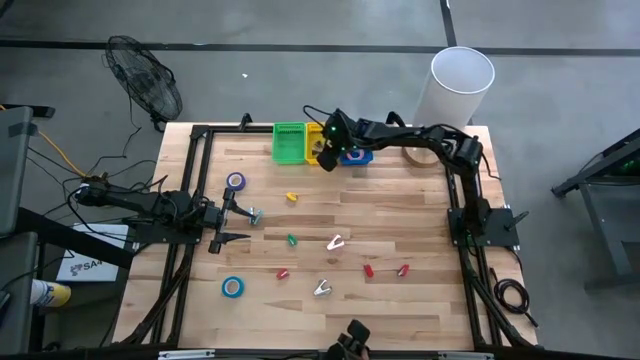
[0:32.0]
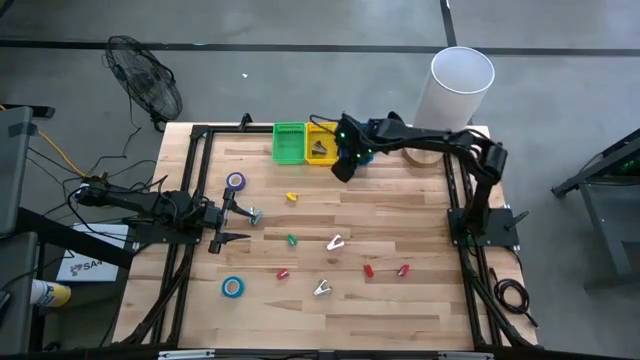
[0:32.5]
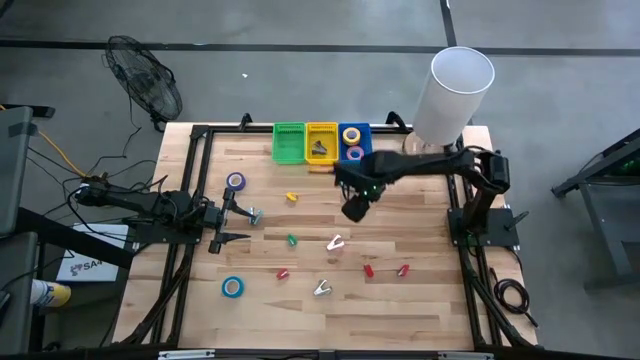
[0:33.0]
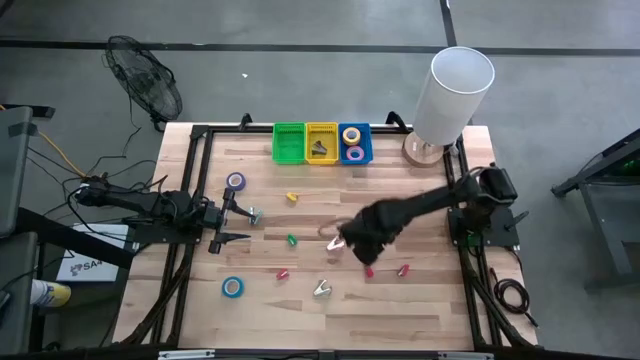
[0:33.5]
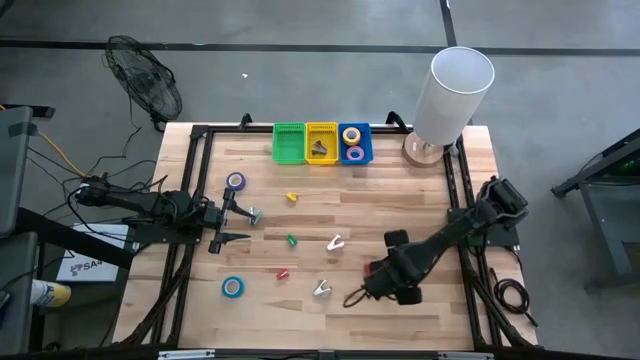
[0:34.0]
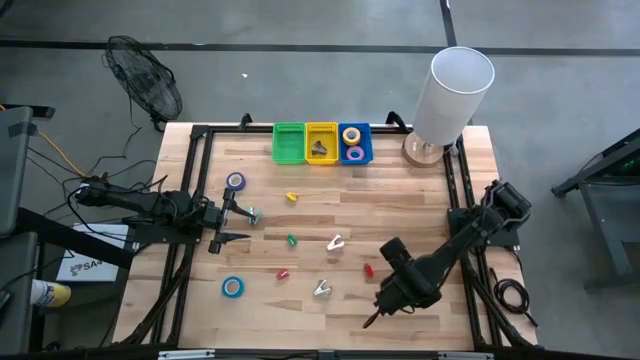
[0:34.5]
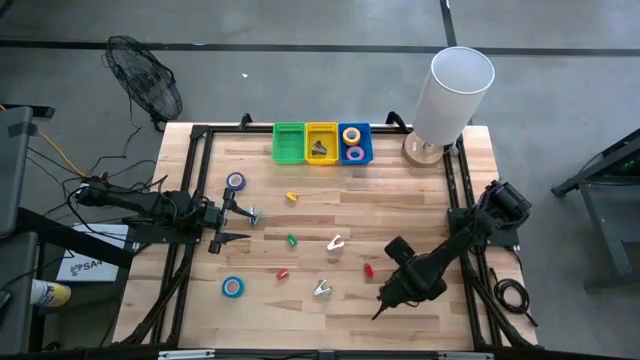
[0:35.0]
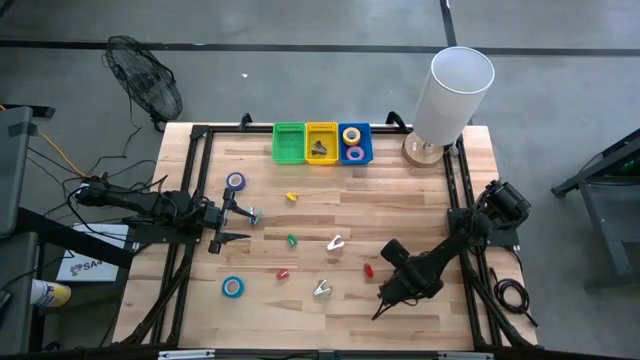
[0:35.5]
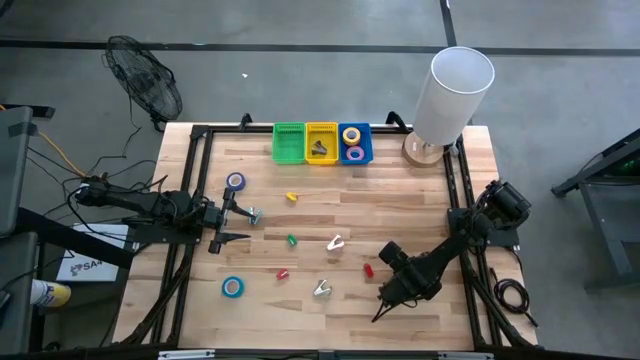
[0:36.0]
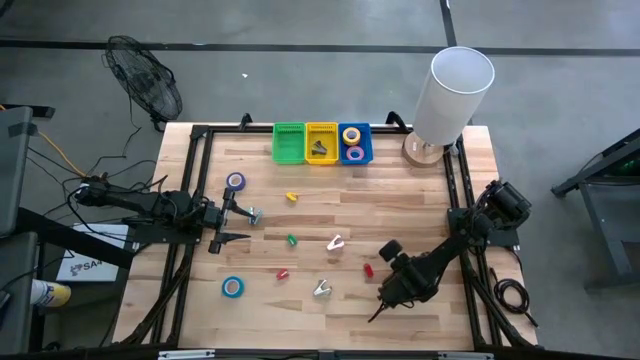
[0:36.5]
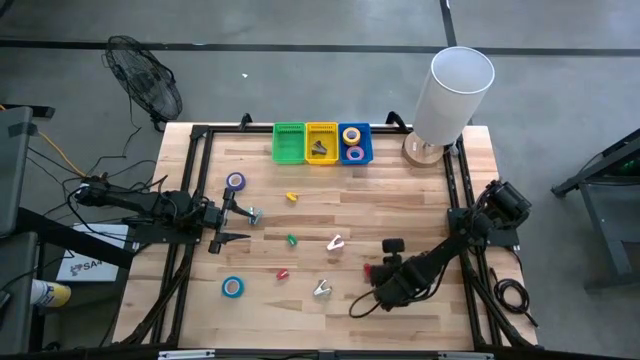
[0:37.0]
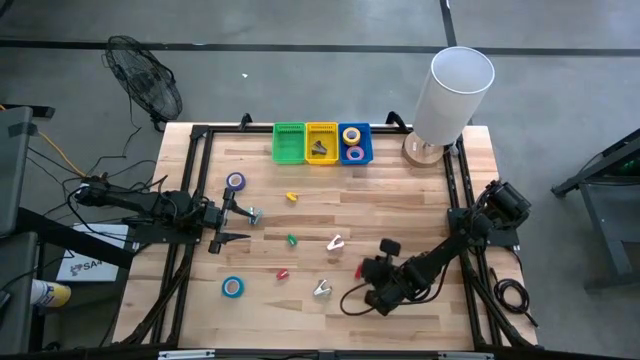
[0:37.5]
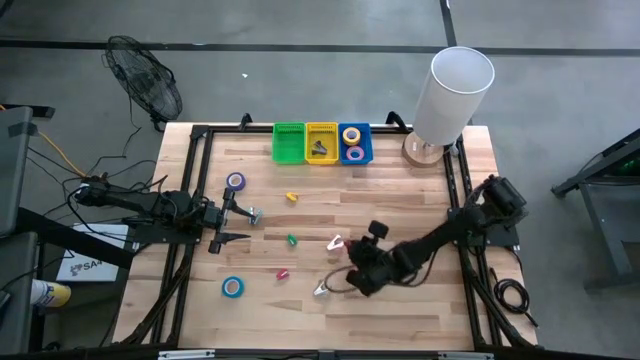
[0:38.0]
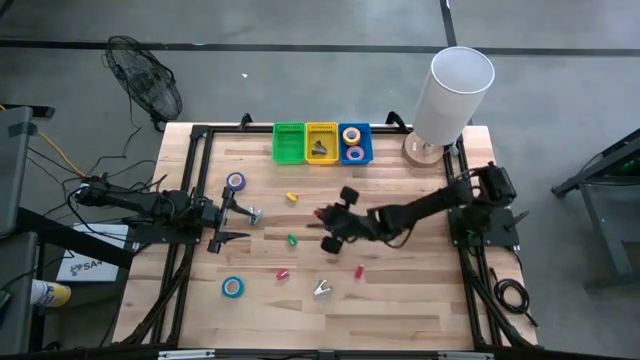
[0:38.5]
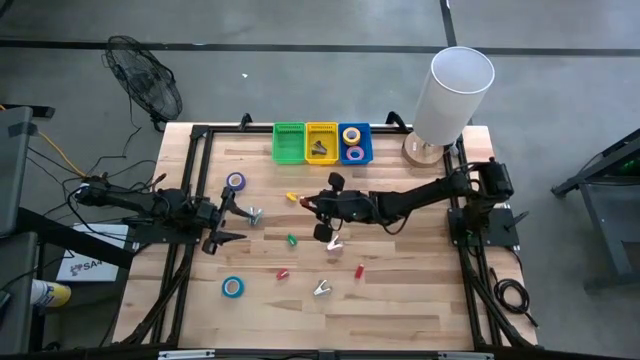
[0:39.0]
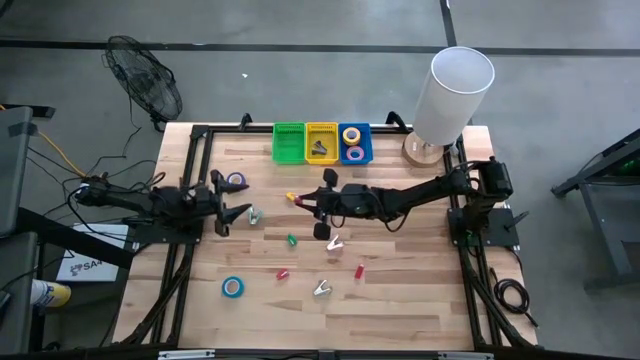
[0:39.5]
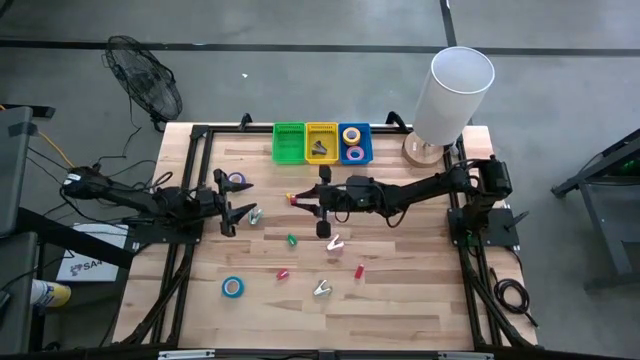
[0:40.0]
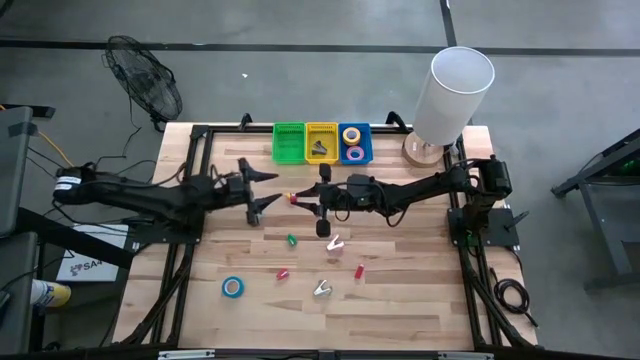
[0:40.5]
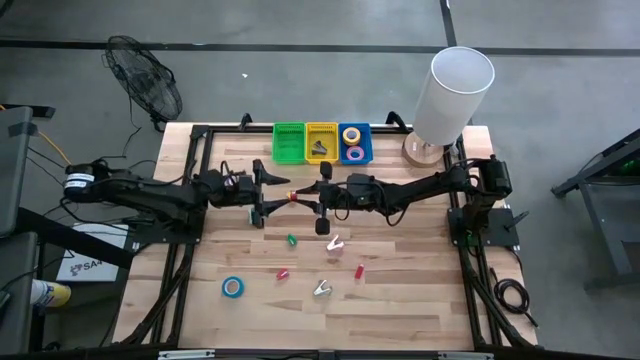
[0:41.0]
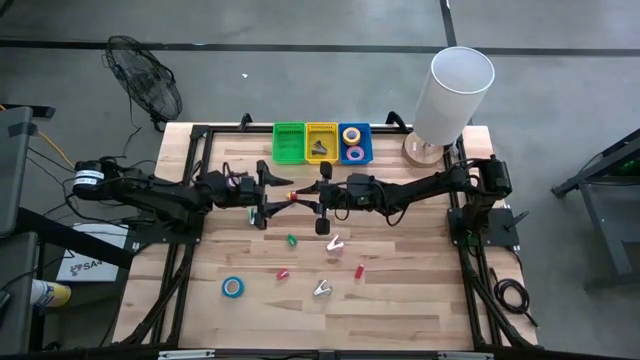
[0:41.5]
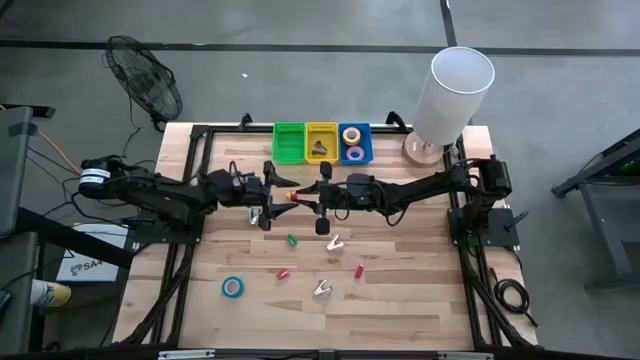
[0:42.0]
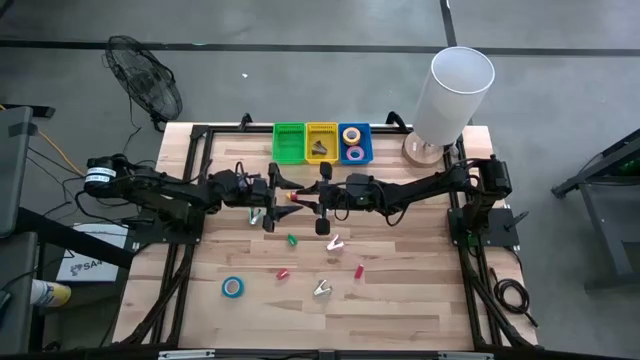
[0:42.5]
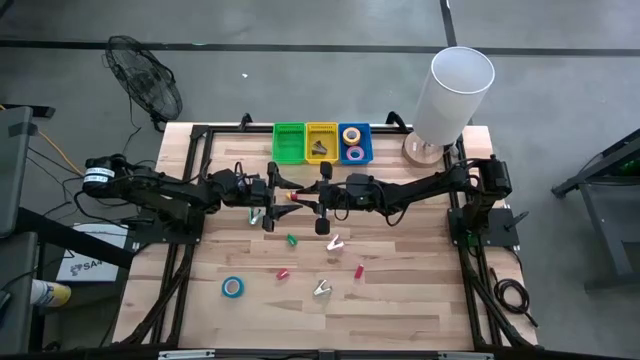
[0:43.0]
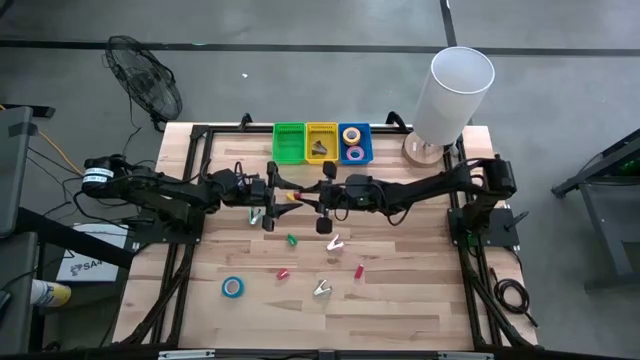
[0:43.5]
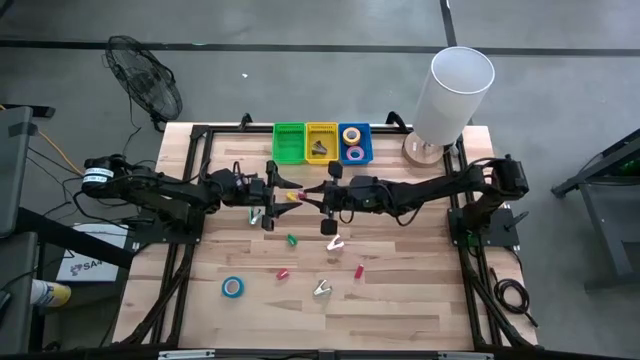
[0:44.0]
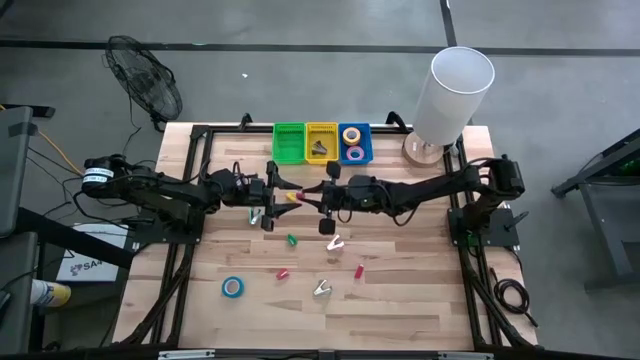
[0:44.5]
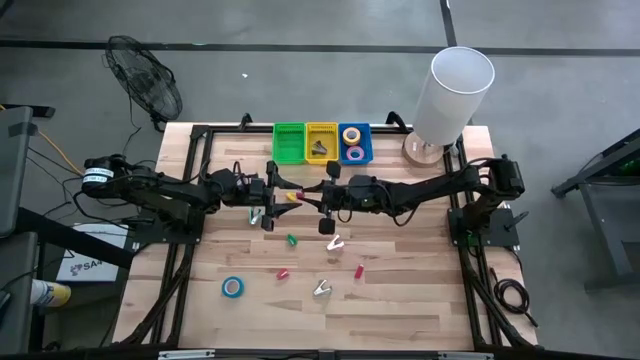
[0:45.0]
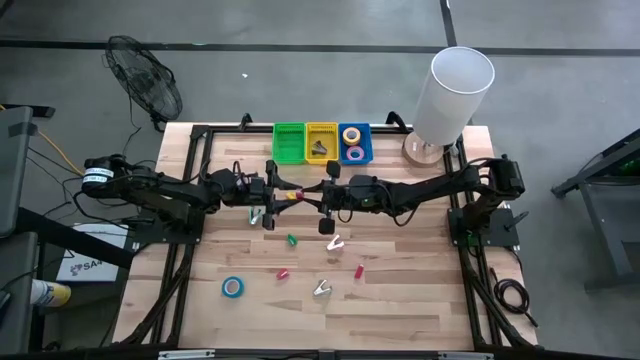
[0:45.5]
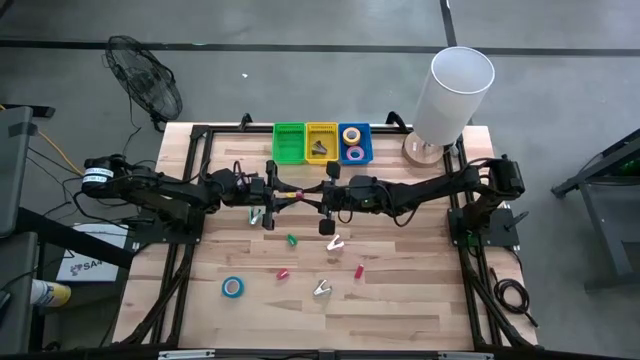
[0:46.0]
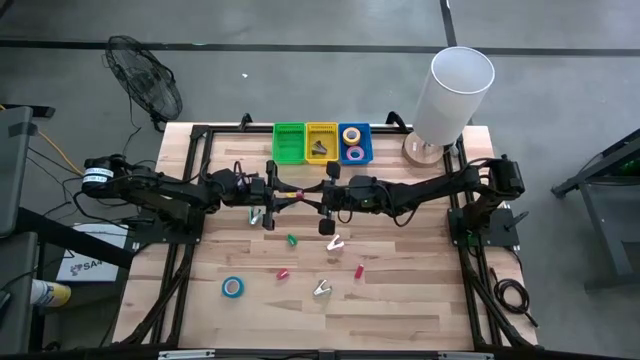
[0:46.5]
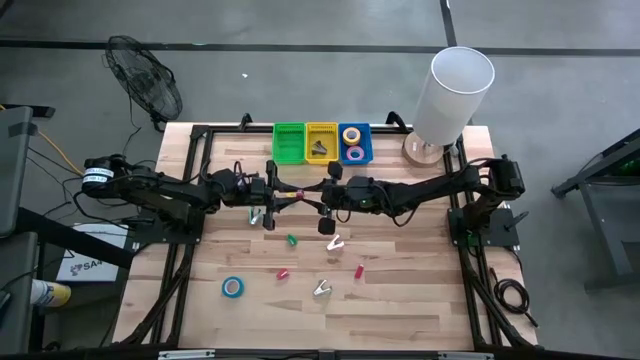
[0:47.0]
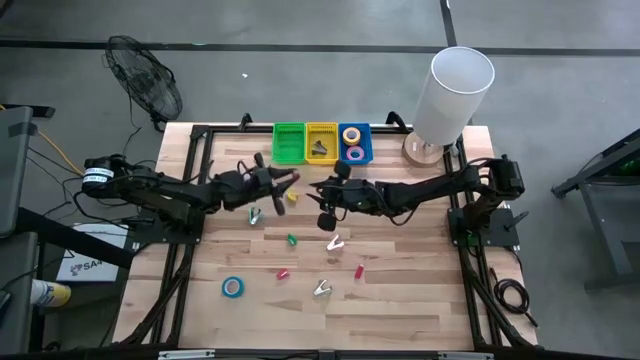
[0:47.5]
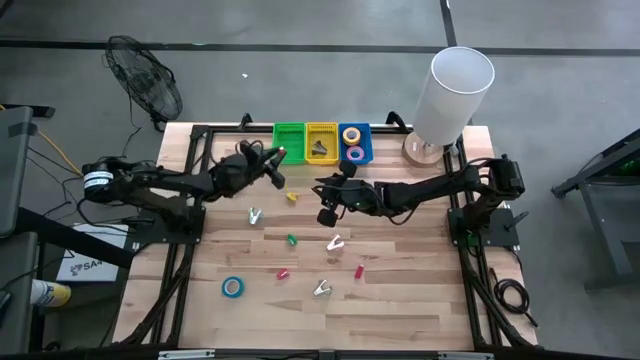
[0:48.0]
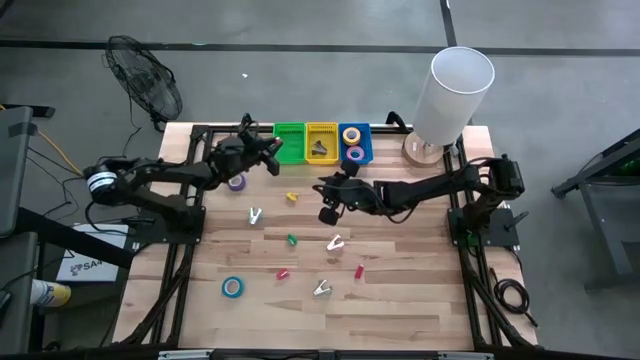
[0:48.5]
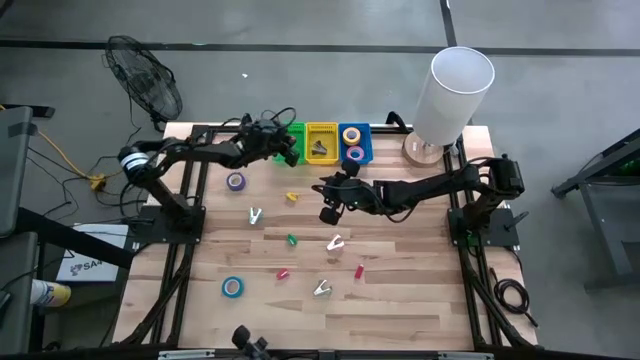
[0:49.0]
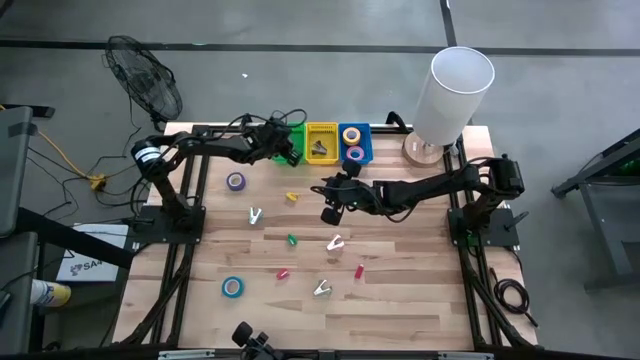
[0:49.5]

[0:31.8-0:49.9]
Task: Pick and place Stapler, Stapler remover, tape
Put the right red stapler into the green bin

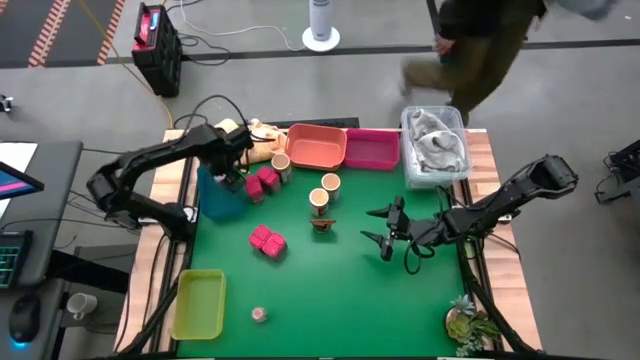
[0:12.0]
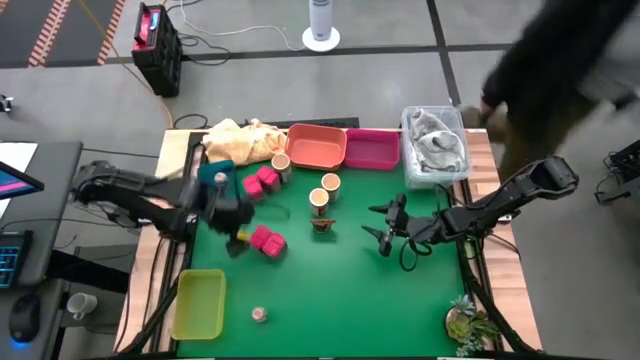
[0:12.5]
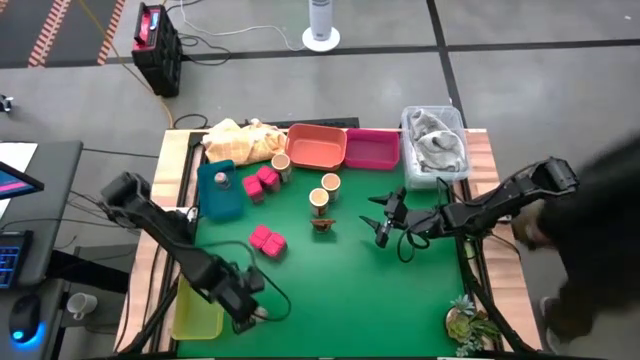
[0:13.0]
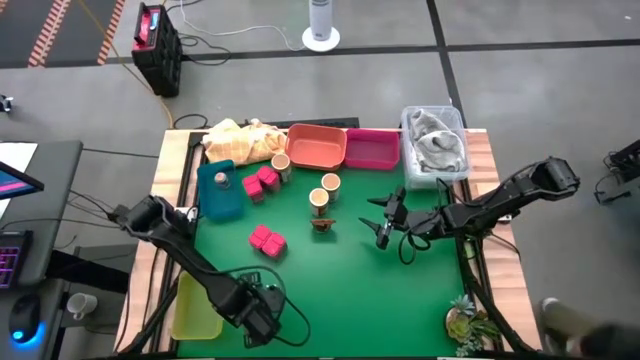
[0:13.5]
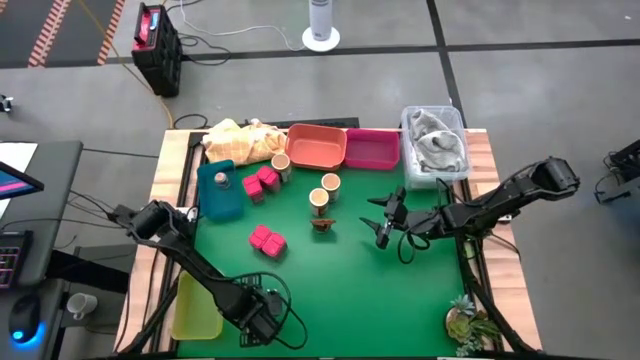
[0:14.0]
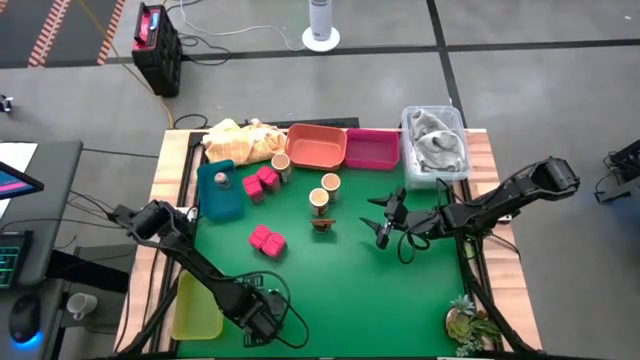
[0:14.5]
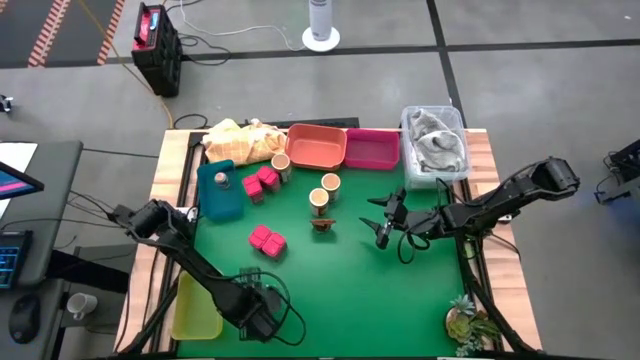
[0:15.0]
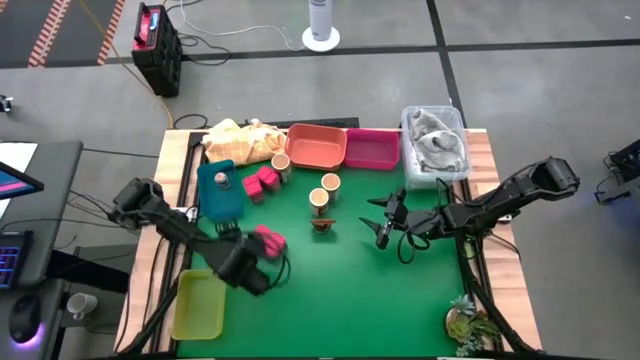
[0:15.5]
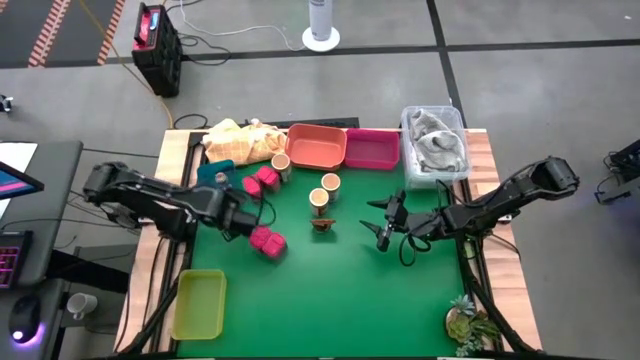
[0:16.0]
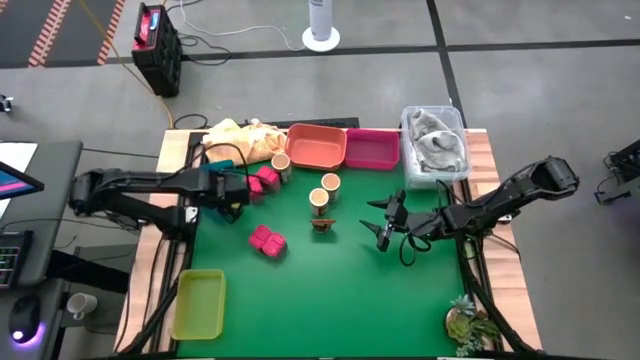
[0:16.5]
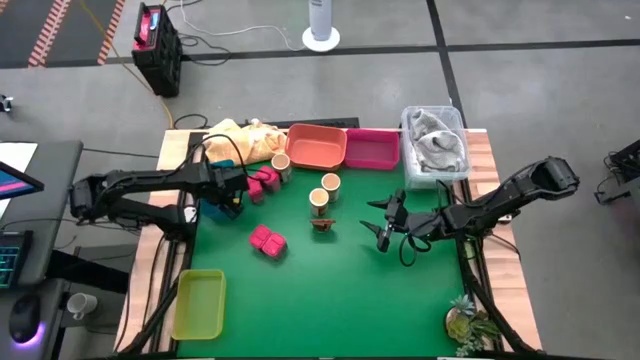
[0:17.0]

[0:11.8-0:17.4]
Task: Sort spices by type
Put the small brown seasoning bottle into the blue bin
